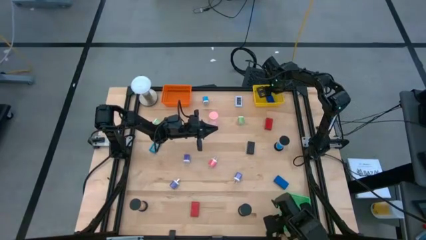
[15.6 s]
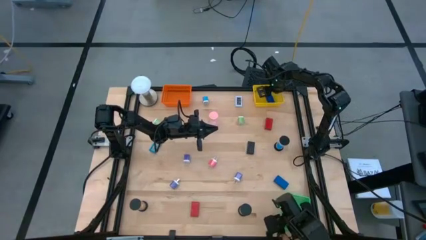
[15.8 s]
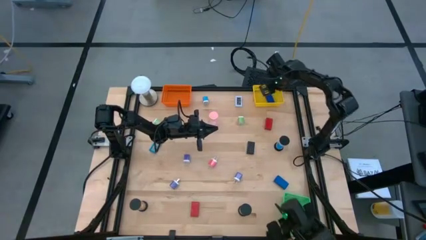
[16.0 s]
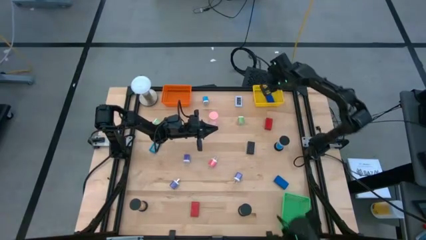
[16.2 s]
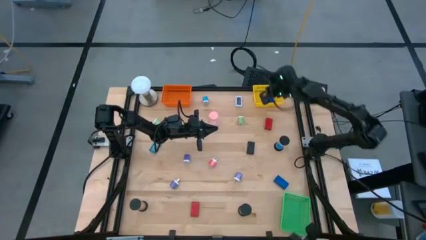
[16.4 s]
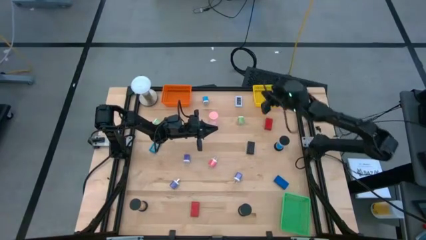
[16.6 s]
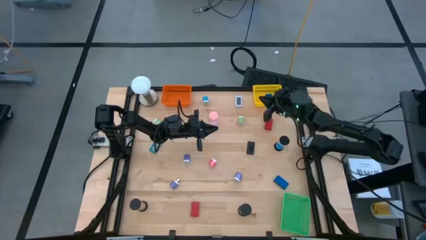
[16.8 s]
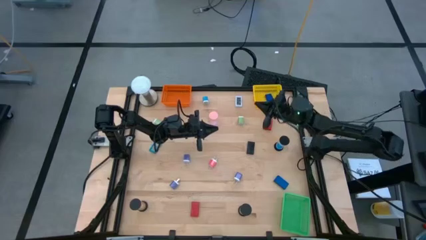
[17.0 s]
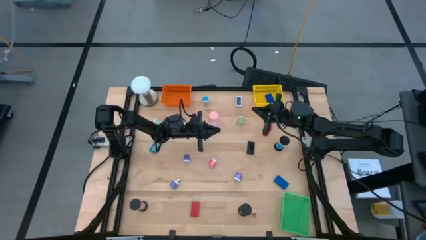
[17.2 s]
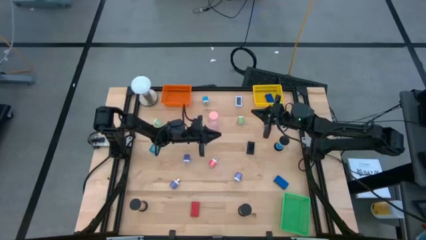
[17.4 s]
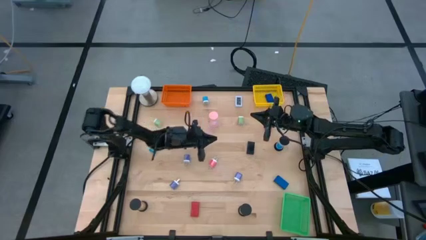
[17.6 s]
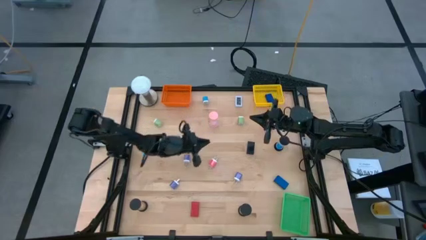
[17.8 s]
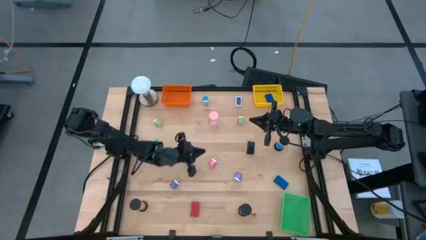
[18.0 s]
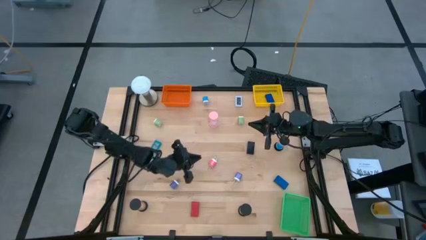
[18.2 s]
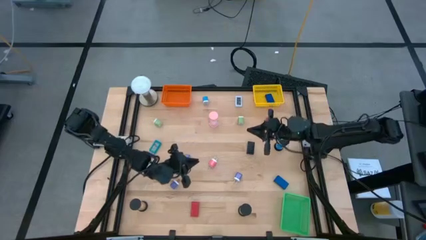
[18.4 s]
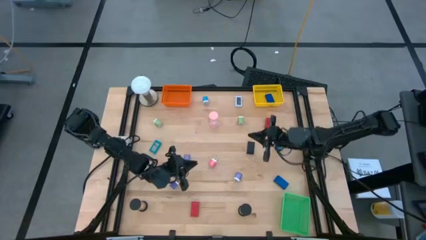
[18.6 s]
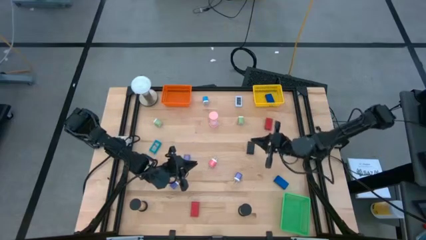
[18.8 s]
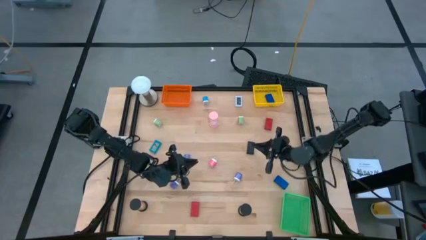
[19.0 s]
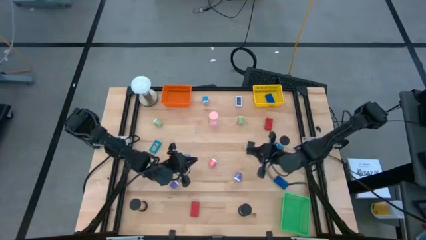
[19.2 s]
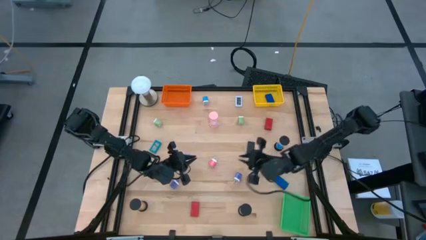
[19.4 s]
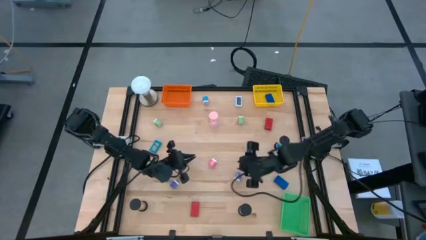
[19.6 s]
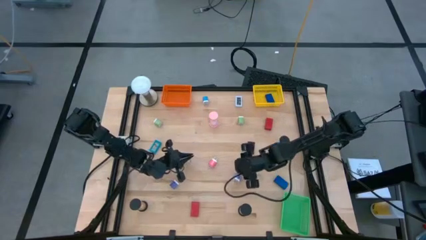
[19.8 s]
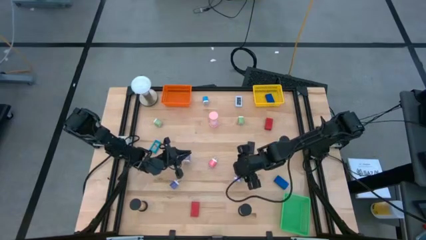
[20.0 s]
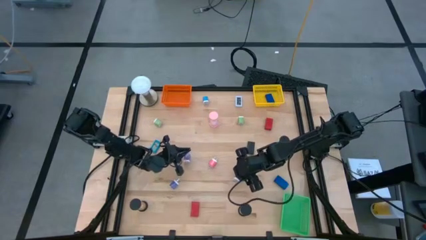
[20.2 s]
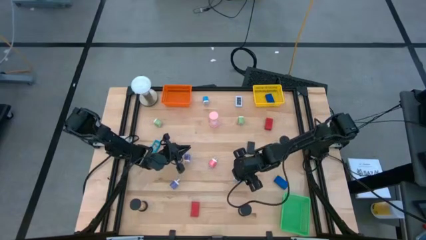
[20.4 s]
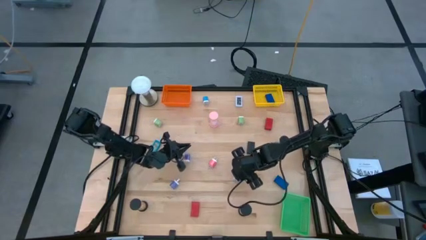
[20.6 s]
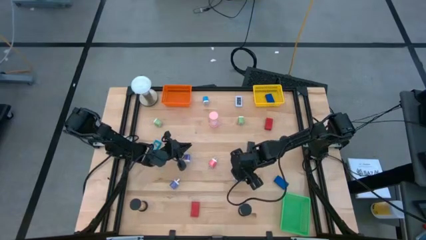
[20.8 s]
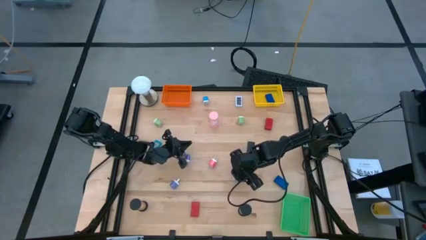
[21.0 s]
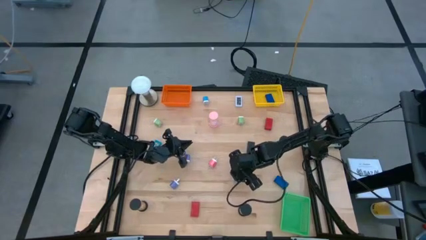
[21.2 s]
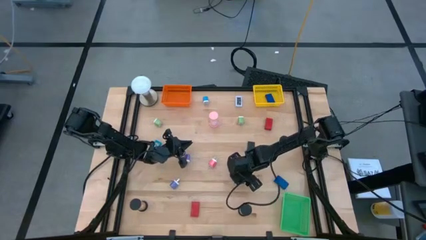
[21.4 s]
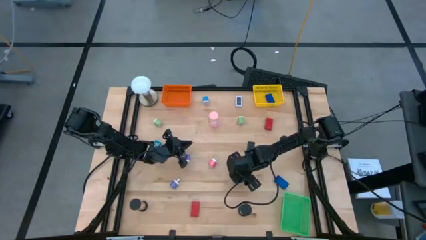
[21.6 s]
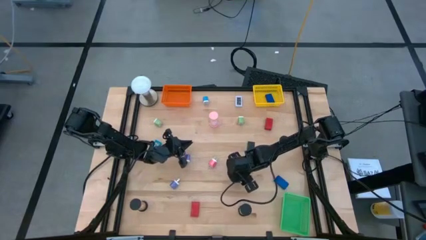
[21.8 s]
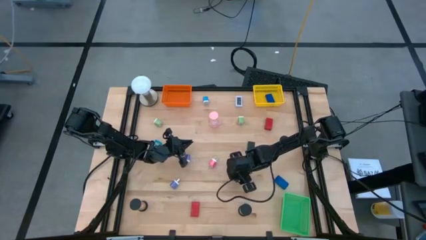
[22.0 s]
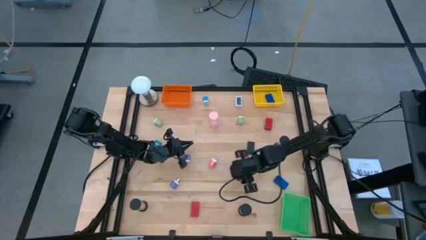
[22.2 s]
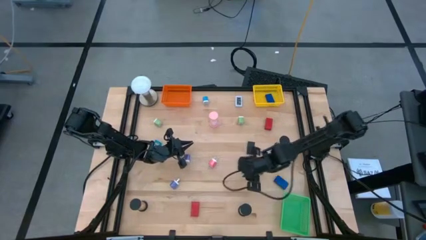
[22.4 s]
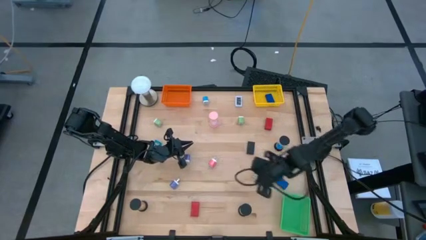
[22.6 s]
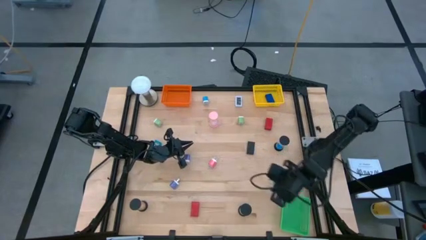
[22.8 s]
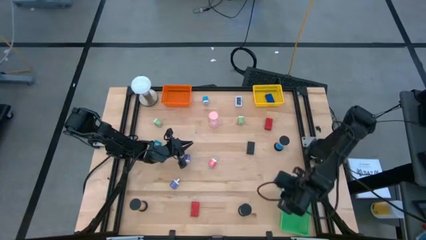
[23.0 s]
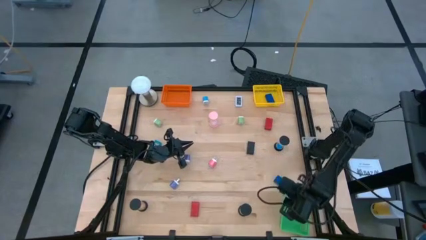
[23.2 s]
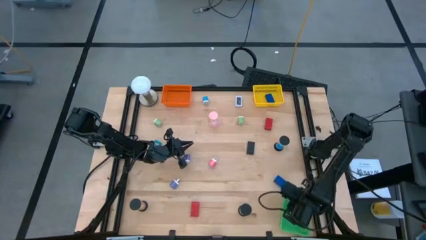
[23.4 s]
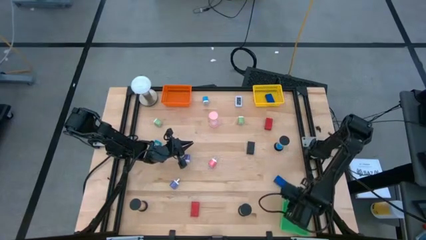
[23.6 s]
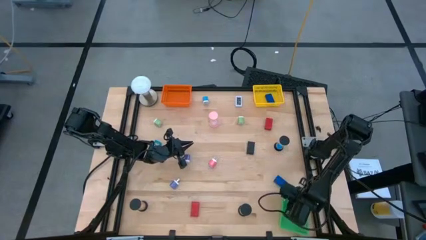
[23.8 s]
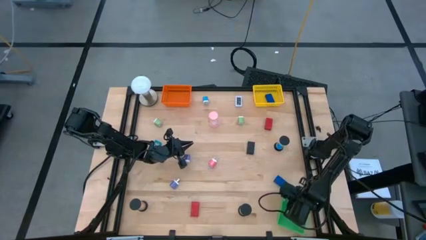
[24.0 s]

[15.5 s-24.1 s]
Task: Pick & Place Office items
Put the right purple charger adapter into the green basket

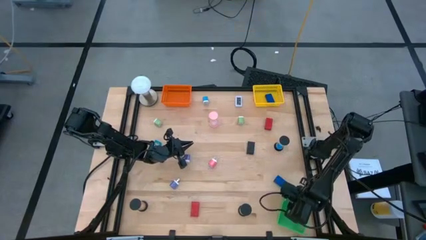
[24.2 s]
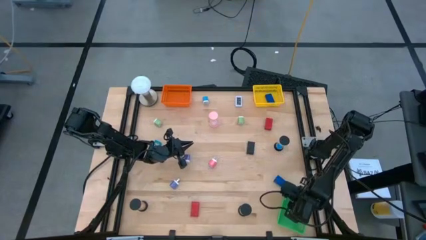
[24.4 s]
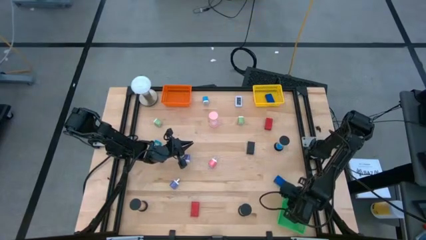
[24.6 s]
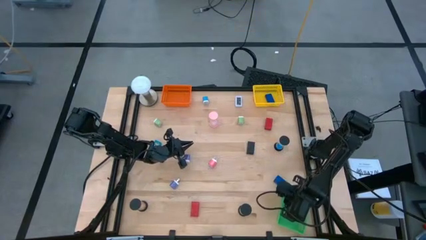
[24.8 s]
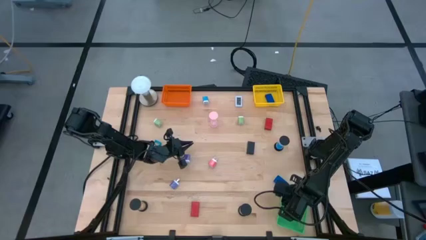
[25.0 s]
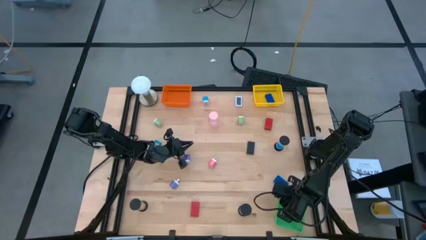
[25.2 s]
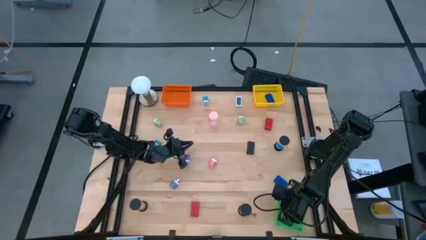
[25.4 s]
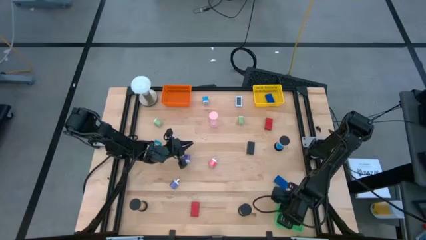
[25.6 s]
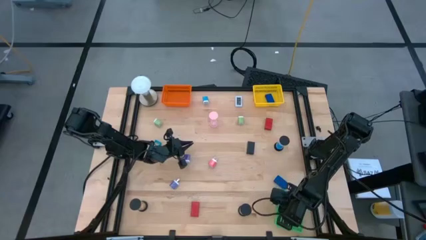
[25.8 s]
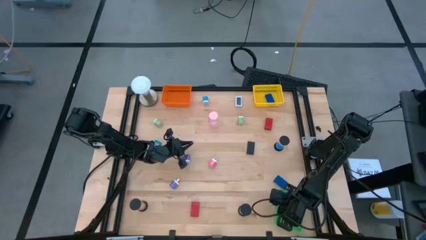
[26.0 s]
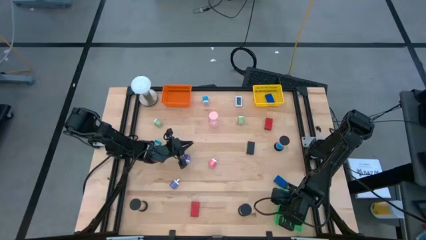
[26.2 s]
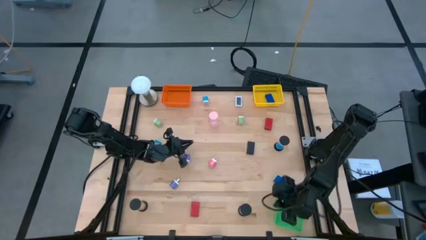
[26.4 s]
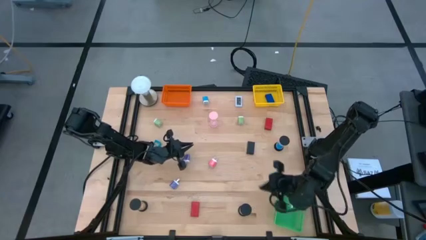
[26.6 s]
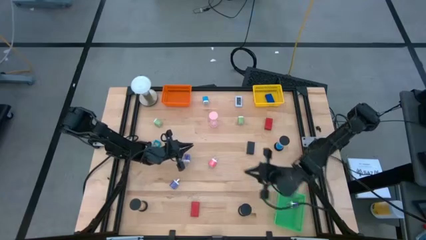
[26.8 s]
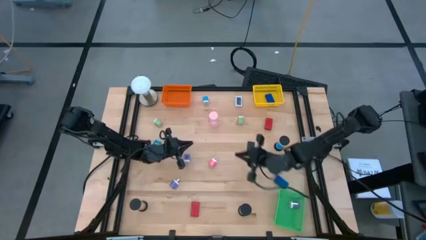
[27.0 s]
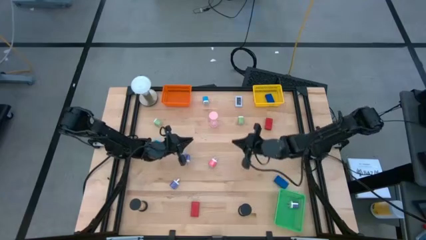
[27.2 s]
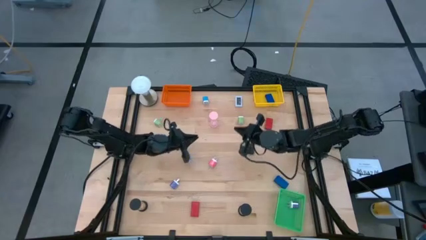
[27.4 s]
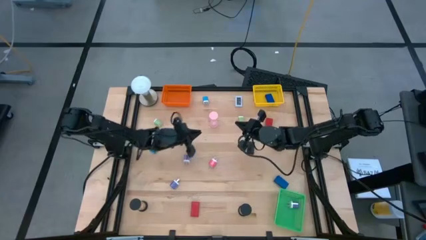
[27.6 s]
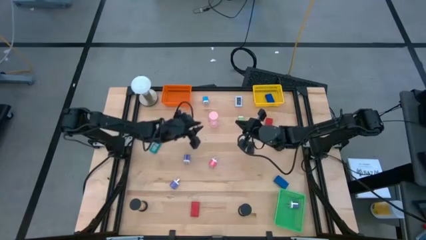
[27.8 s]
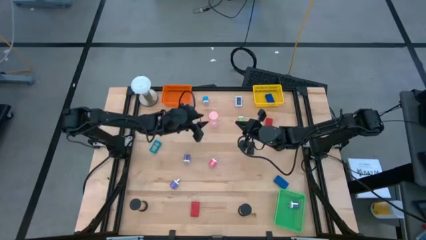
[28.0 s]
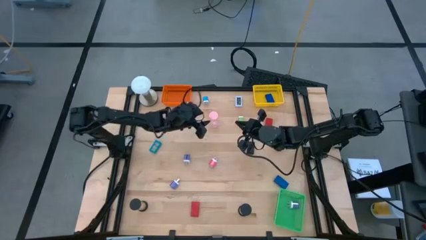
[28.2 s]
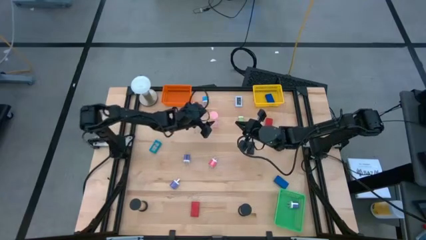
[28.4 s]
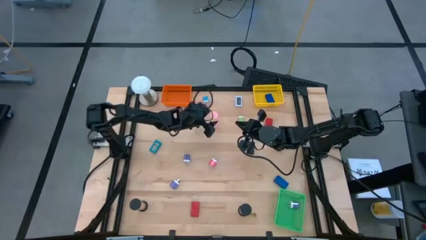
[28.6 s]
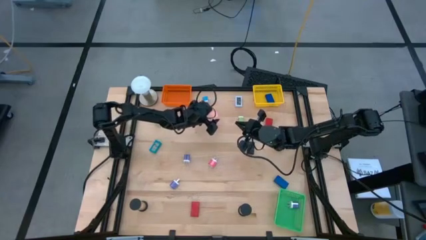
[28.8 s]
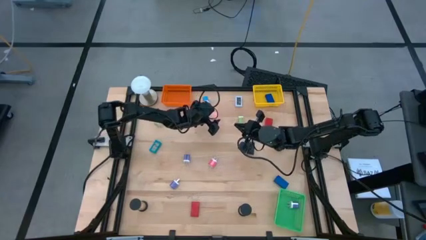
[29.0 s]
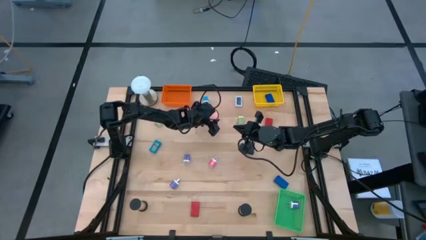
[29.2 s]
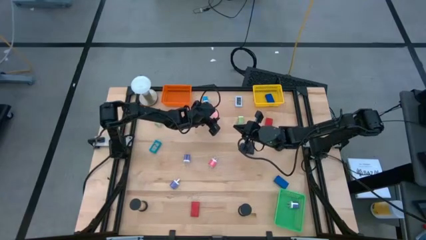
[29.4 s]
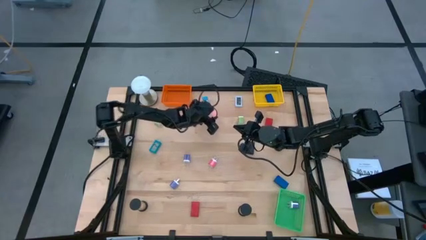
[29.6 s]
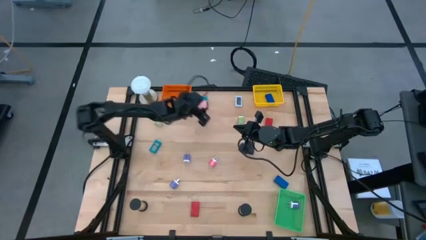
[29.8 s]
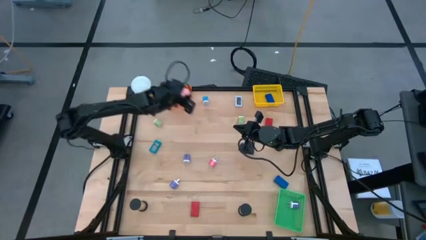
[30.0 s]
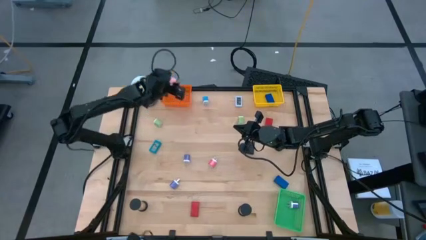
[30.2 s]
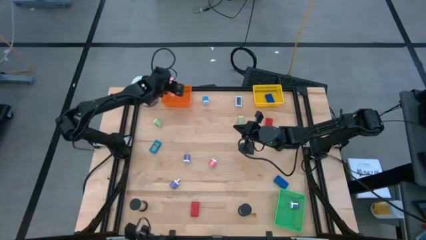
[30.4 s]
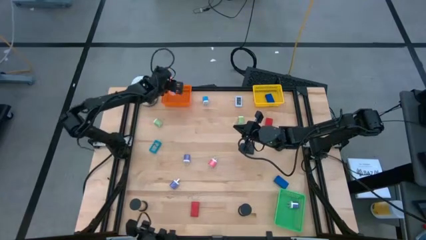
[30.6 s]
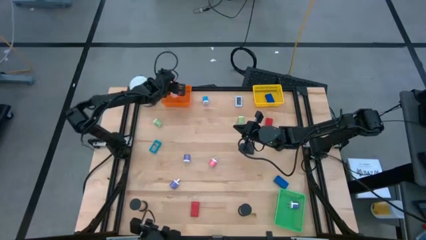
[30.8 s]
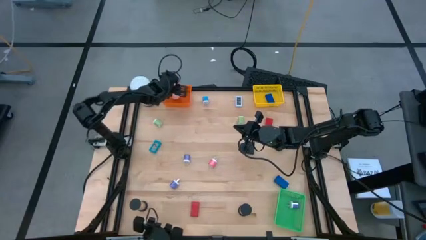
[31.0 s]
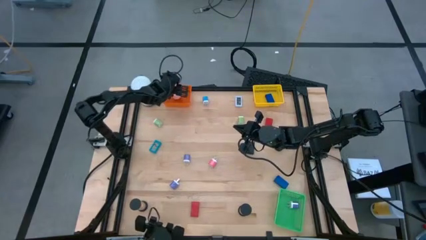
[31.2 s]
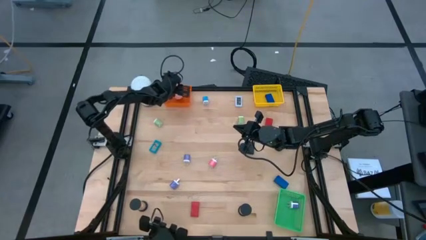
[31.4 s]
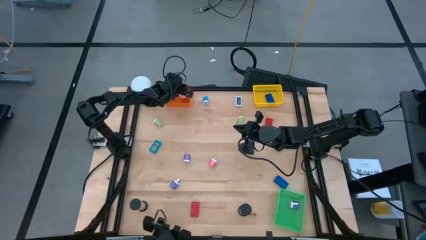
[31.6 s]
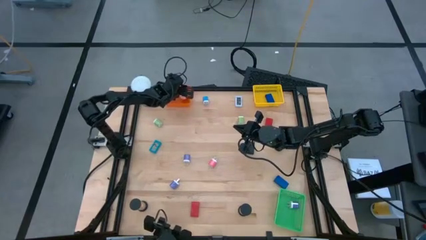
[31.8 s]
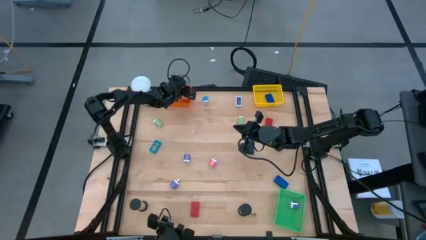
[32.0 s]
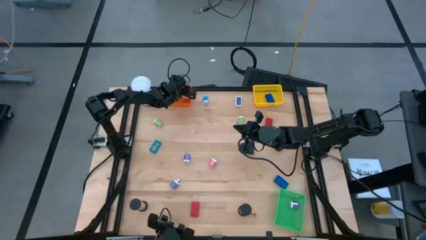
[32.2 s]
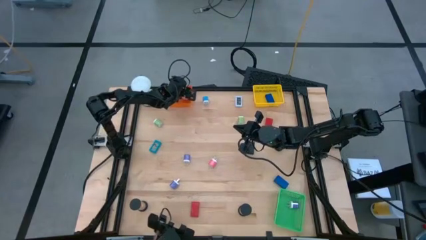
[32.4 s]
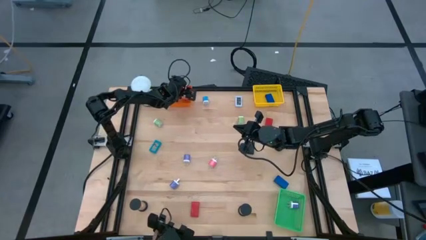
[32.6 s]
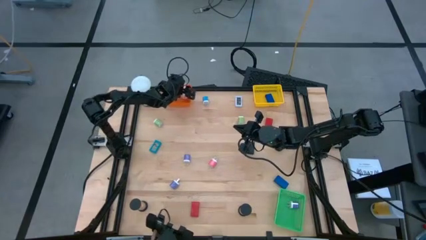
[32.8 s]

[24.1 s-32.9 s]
Put the pink hourglass into the orange basket
